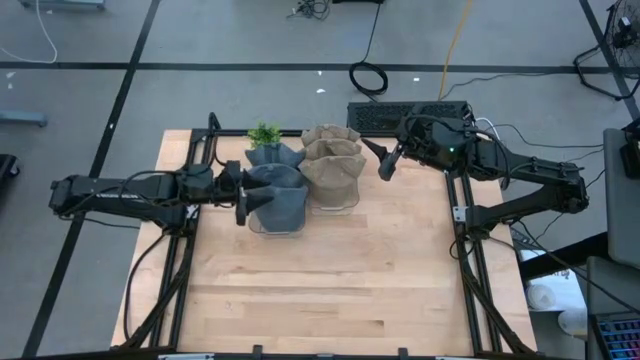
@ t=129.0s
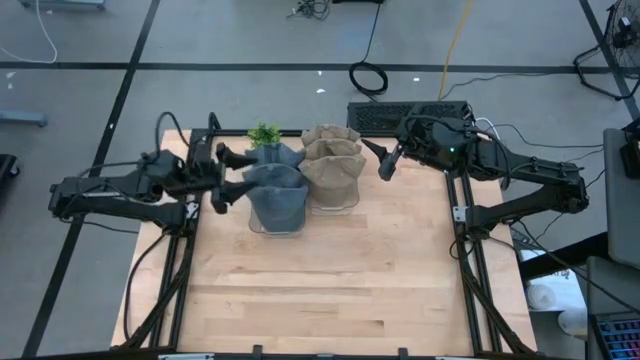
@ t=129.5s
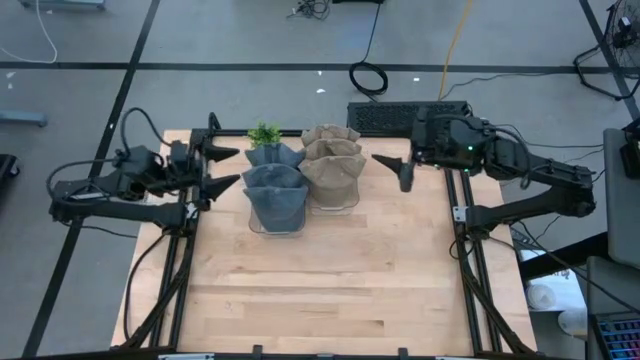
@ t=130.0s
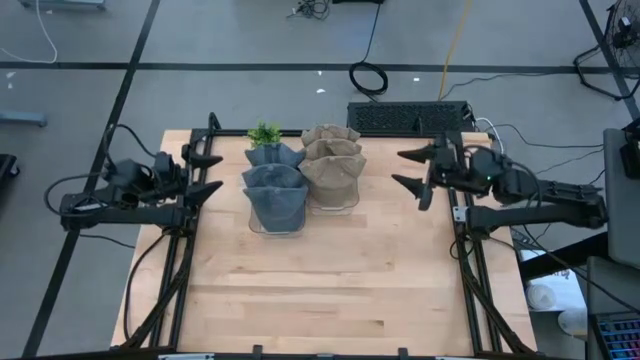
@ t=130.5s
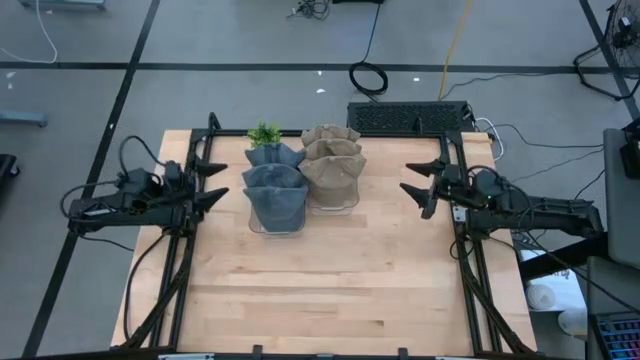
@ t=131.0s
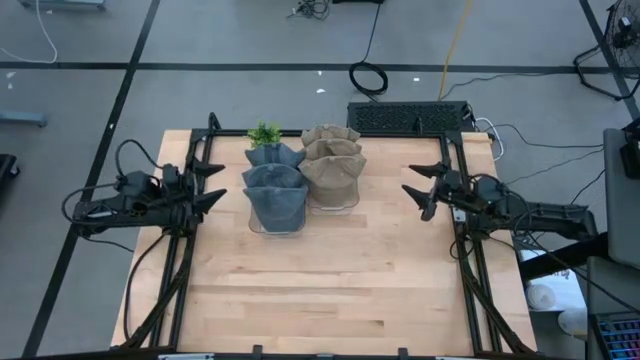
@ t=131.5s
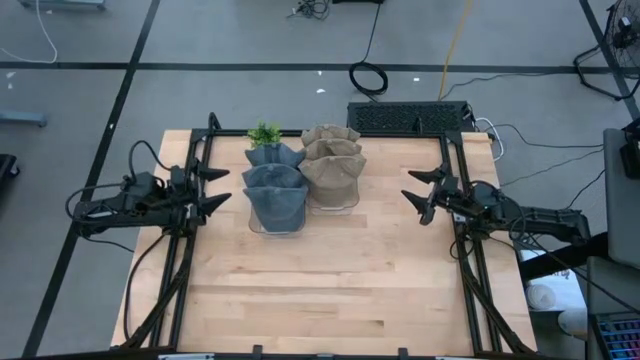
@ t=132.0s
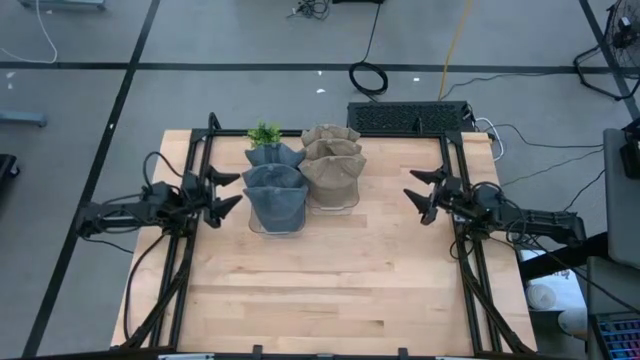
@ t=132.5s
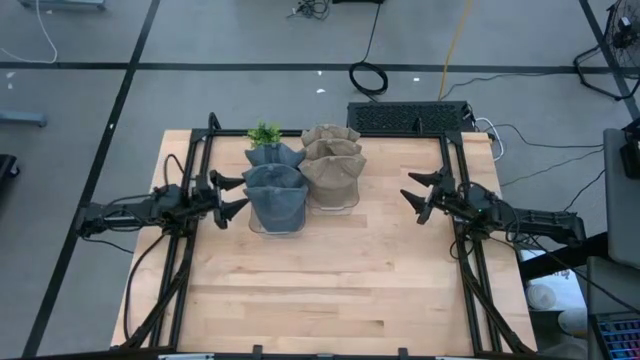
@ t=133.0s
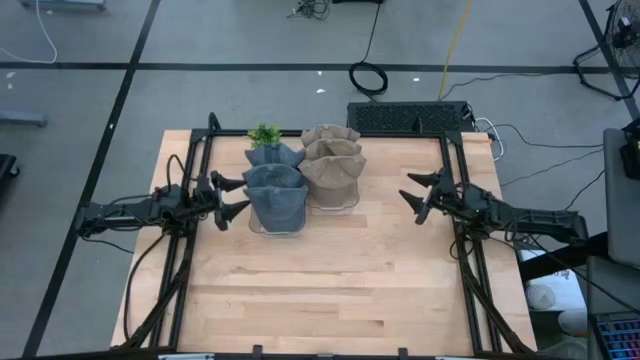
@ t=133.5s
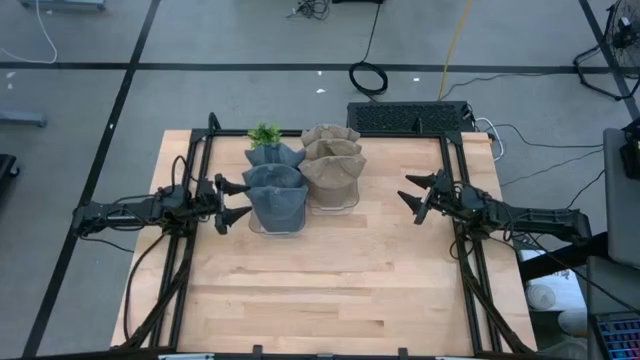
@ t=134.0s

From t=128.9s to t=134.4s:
Task: Pick & Place hat
Return to Home Position

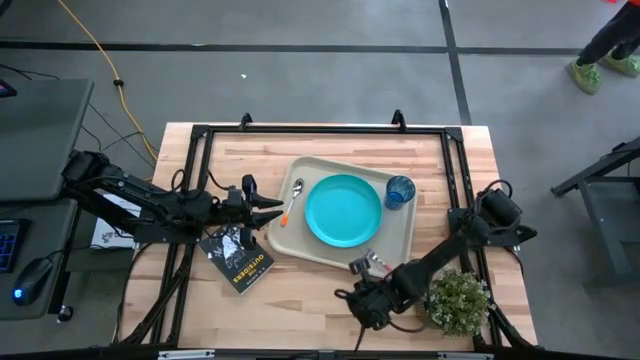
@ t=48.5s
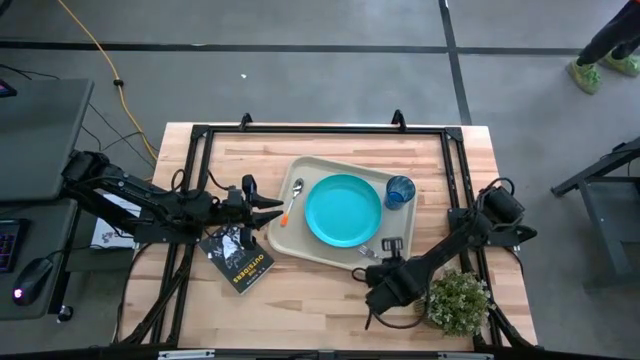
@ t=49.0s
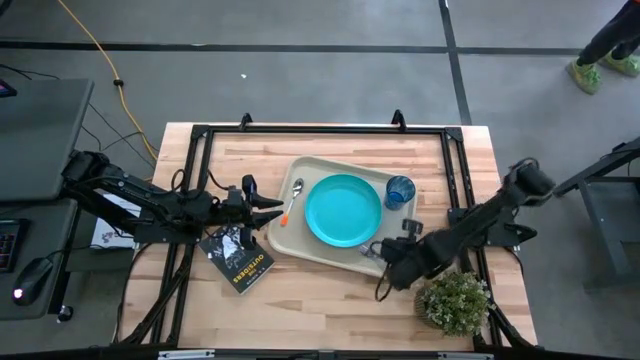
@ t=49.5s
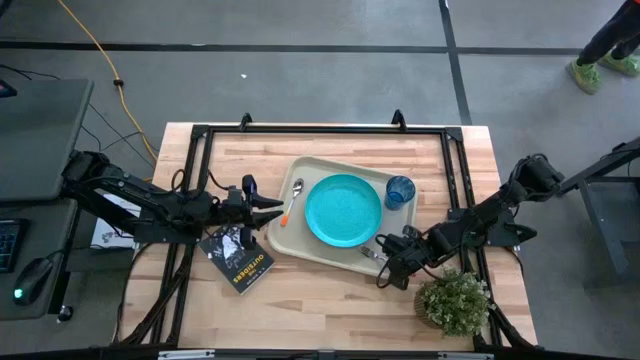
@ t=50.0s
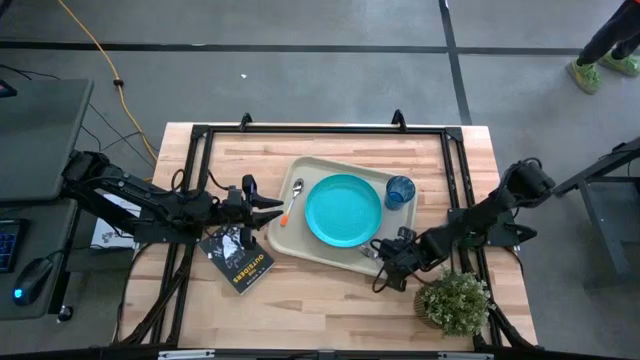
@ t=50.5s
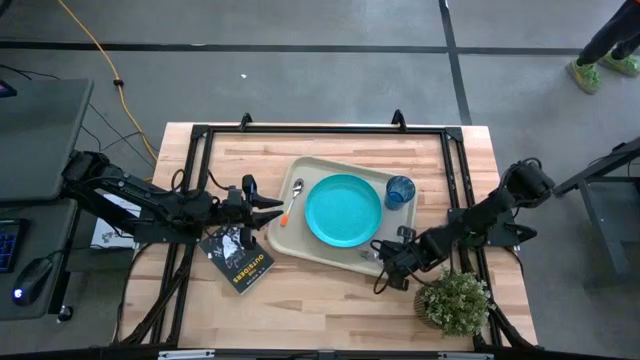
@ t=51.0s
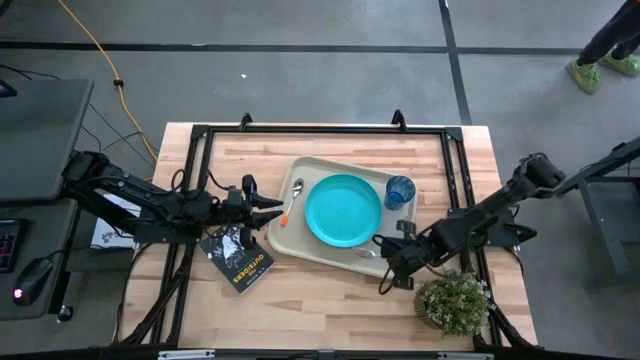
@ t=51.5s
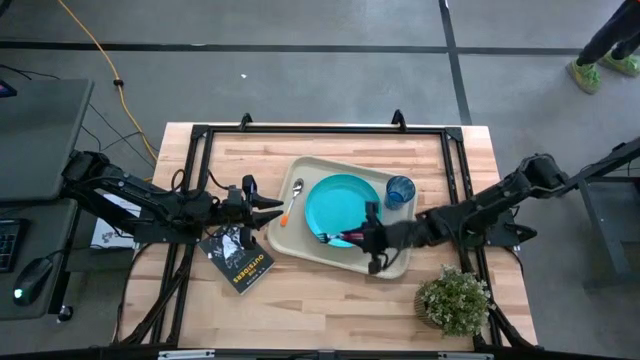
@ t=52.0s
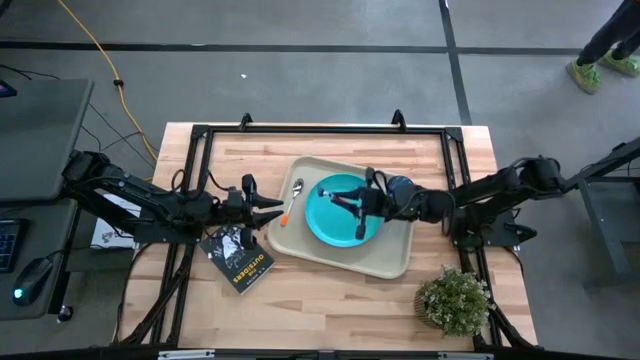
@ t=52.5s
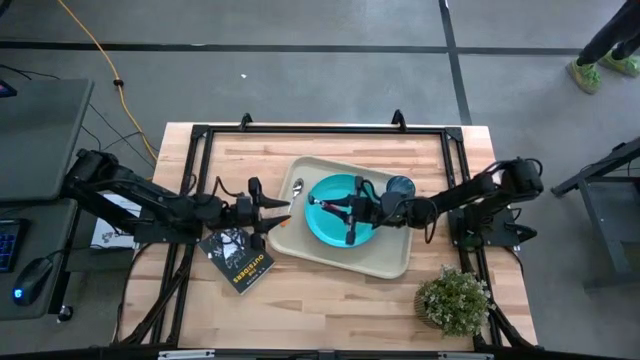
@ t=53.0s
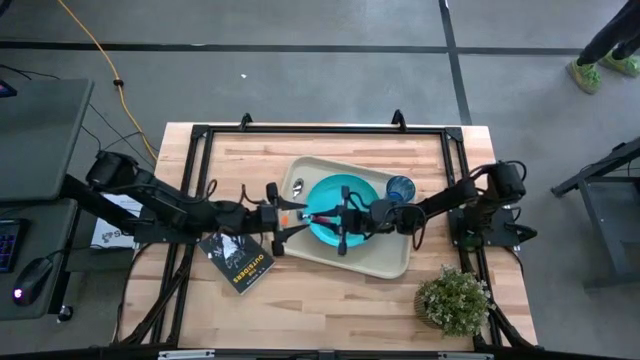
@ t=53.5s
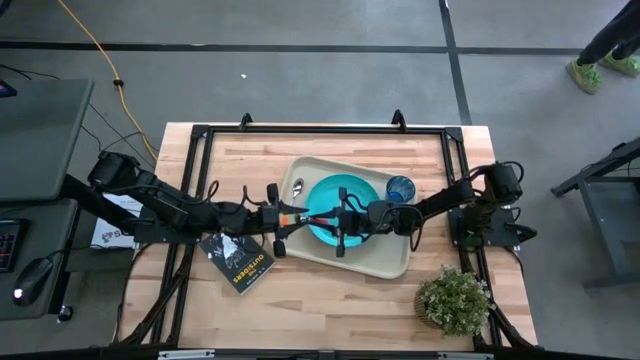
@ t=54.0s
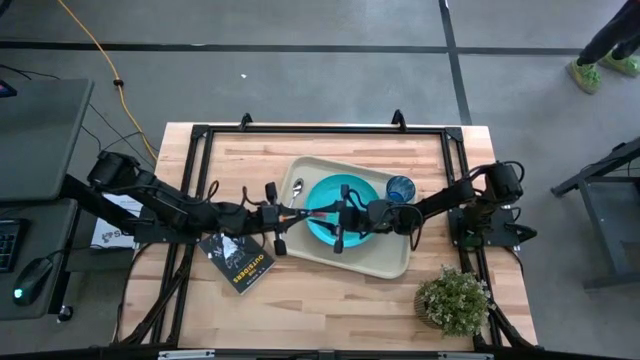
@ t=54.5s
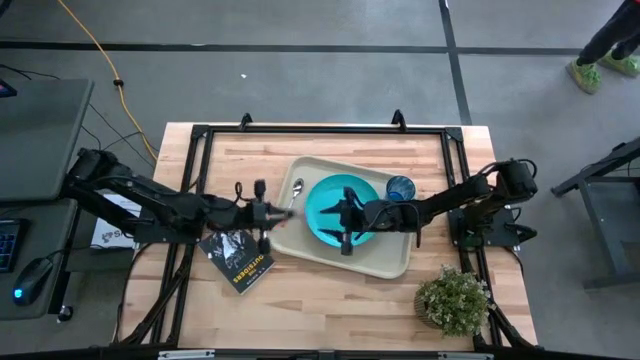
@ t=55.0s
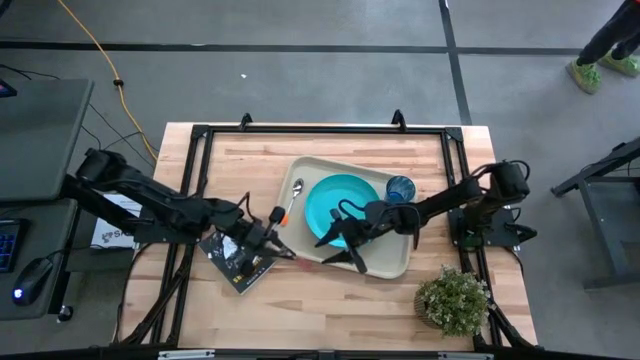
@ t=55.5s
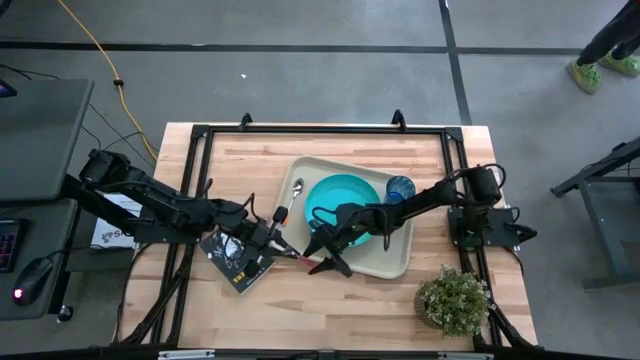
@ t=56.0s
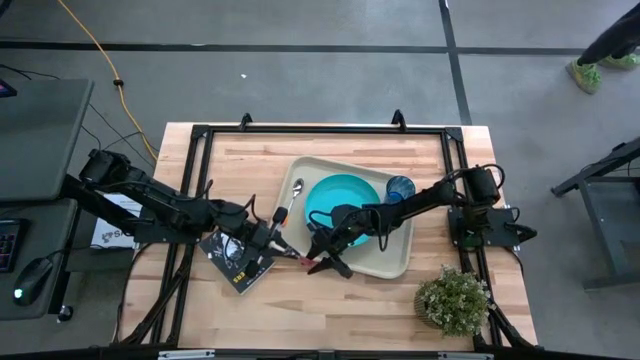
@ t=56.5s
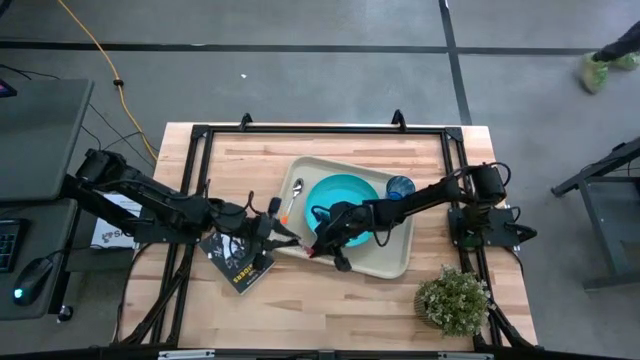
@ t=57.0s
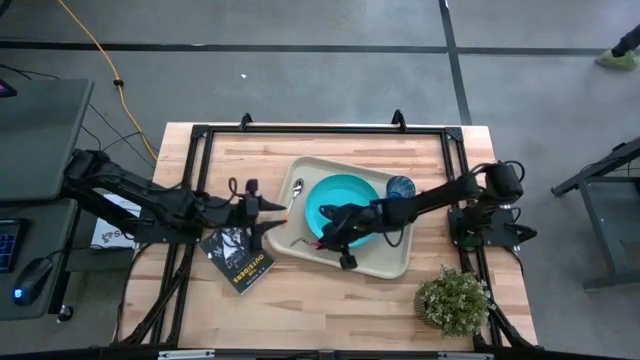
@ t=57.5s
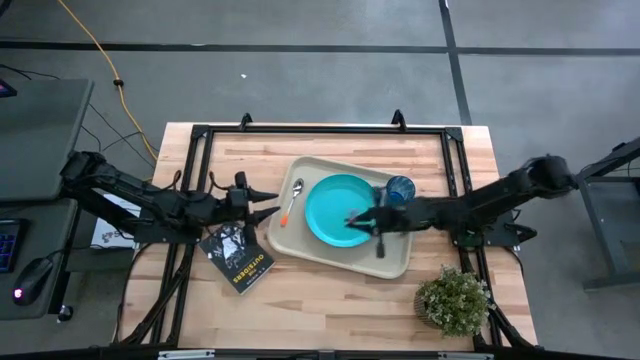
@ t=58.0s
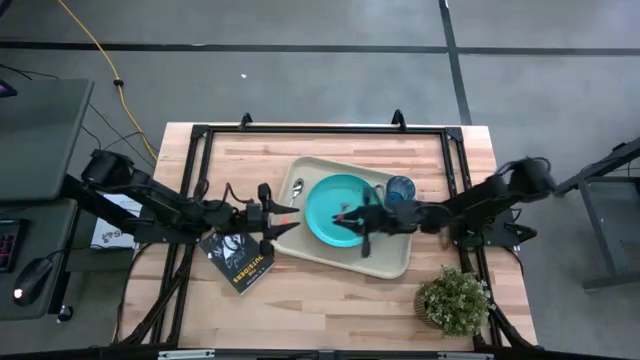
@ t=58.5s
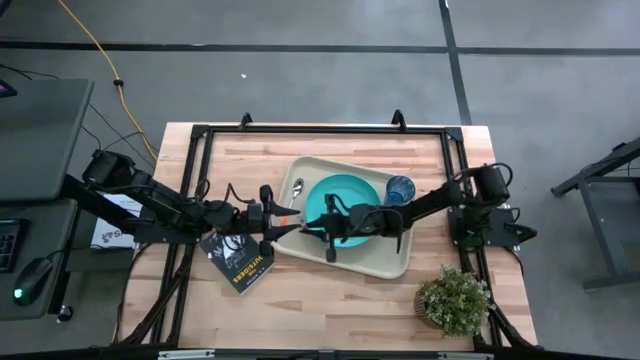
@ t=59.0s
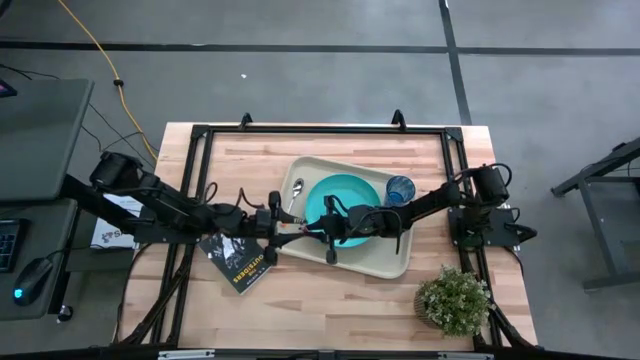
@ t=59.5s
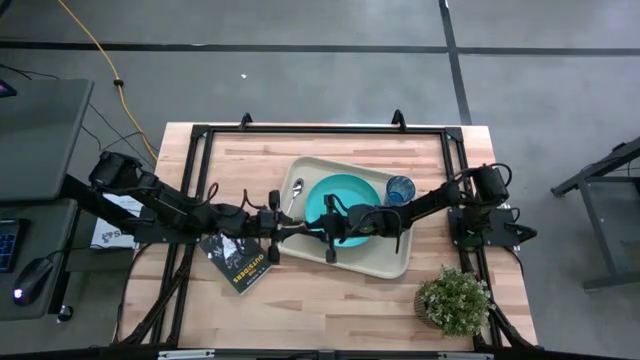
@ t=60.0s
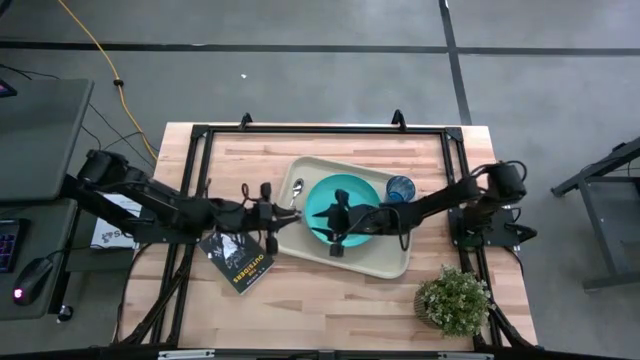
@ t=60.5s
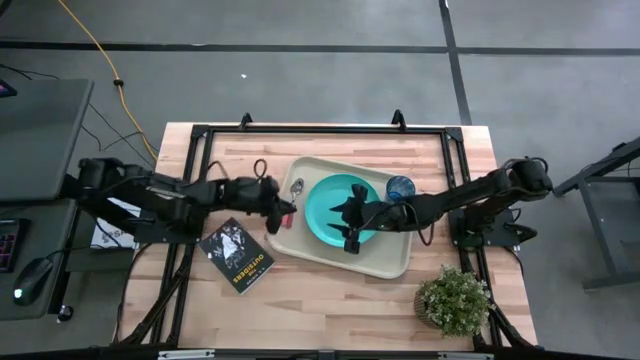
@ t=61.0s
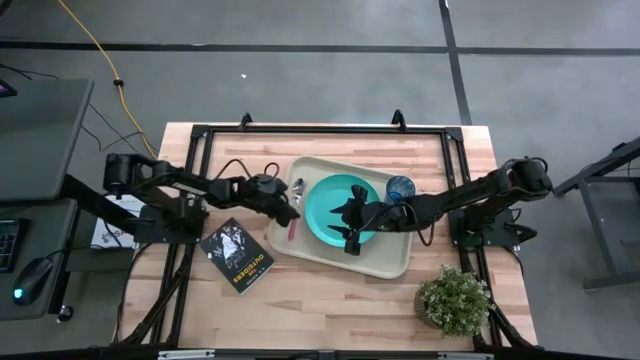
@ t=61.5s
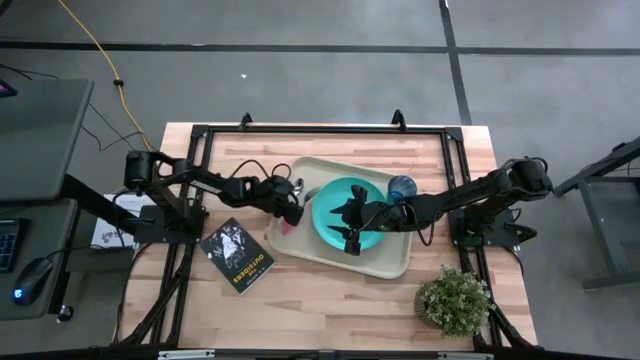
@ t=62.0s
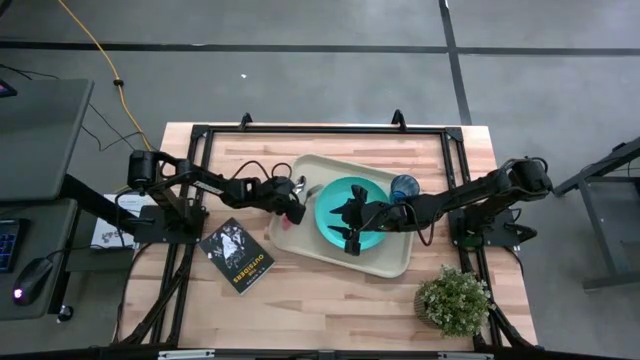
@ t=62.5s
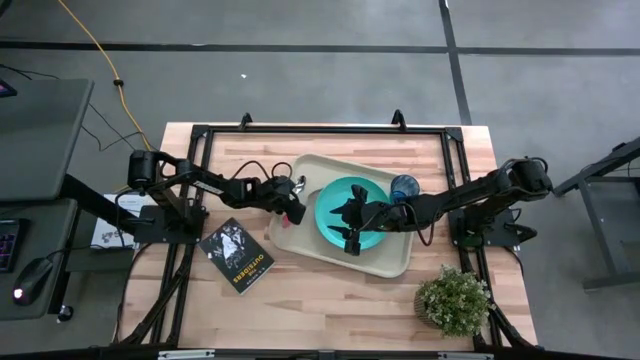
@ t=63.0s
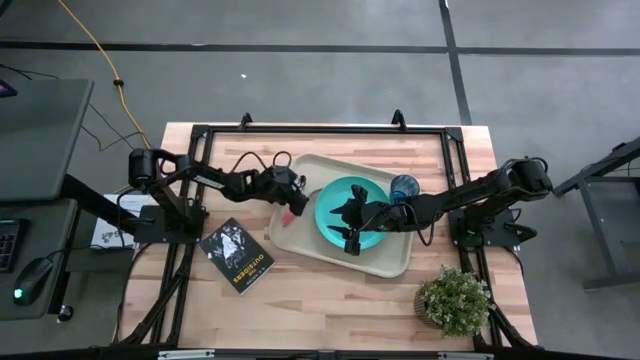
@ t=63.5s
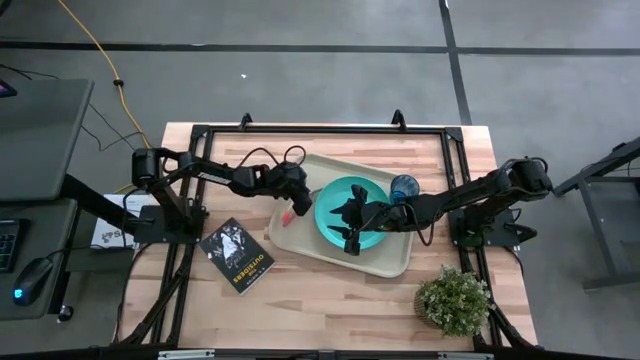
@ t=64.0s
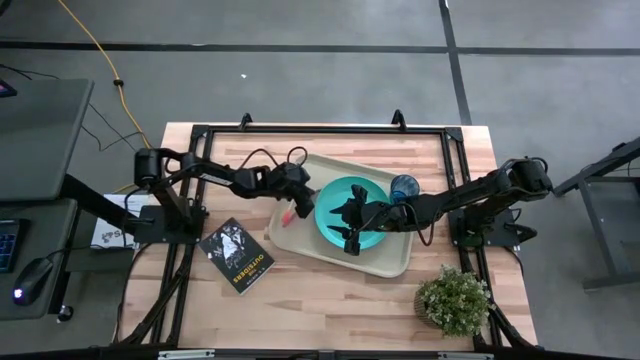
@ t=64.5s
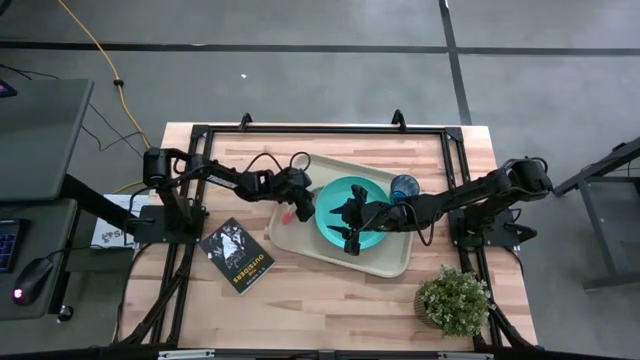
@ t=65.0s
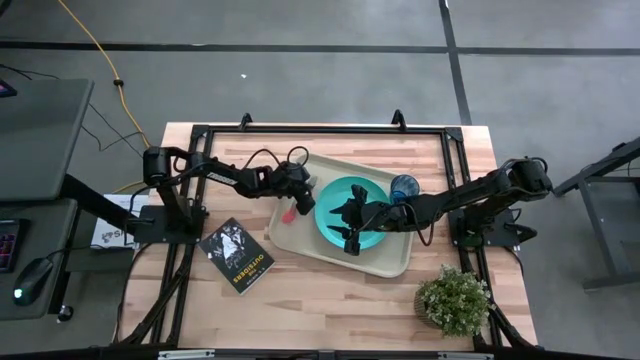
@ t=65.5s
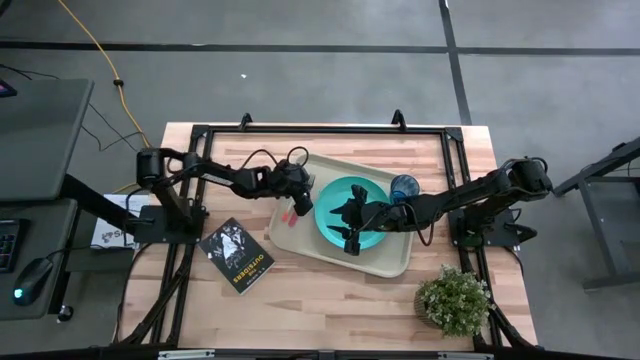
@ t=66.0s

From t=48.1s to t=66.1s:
Task: Pick and place plate/cup/fork/spoon on tray
Put the pink fork on the gray serving tray to the right of the orange spoon
